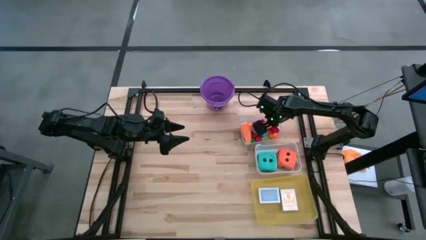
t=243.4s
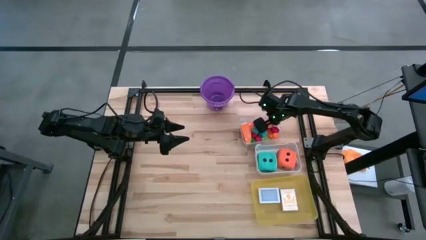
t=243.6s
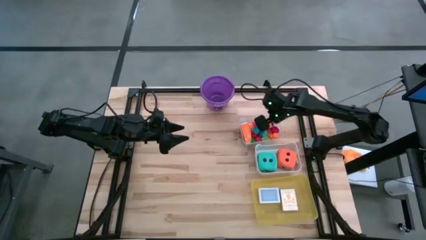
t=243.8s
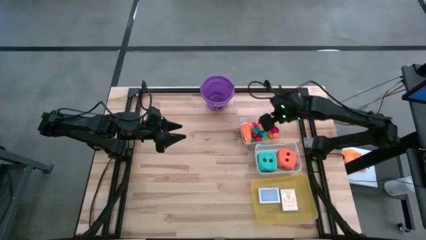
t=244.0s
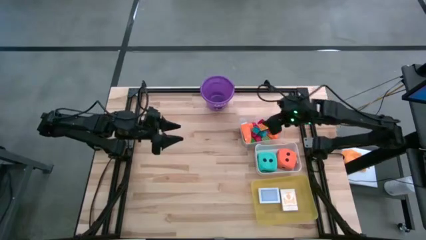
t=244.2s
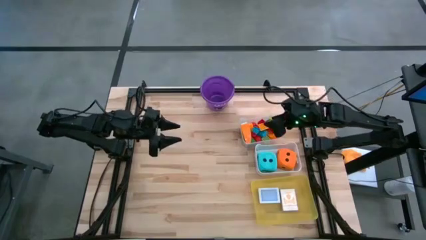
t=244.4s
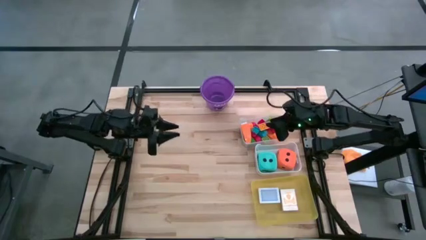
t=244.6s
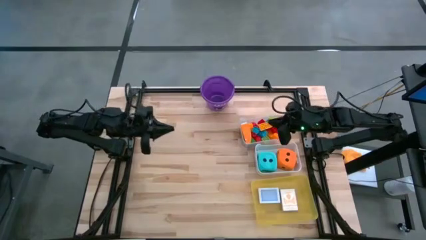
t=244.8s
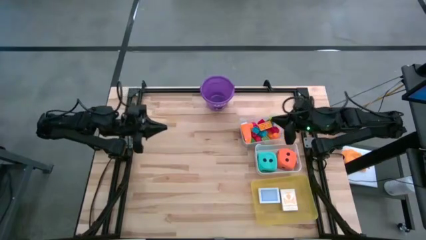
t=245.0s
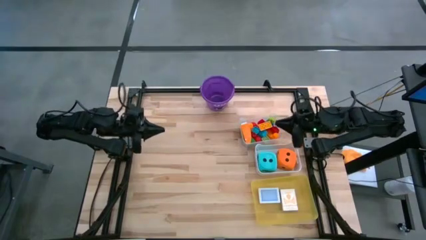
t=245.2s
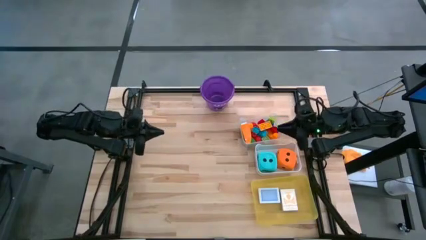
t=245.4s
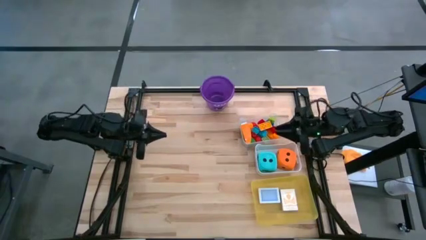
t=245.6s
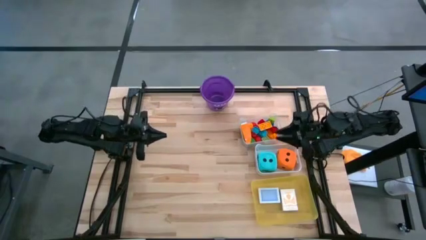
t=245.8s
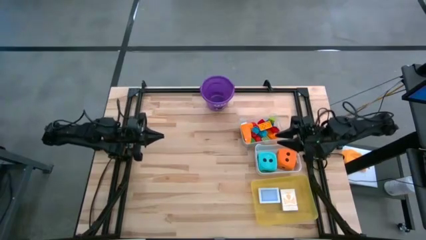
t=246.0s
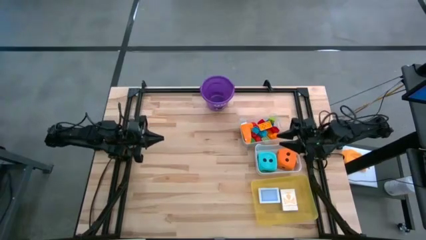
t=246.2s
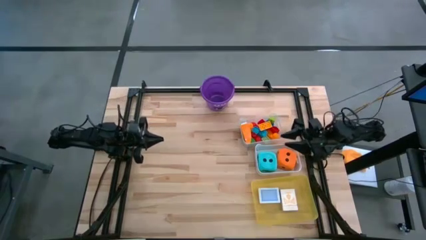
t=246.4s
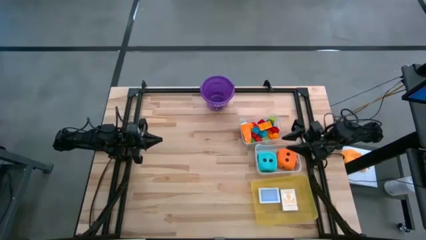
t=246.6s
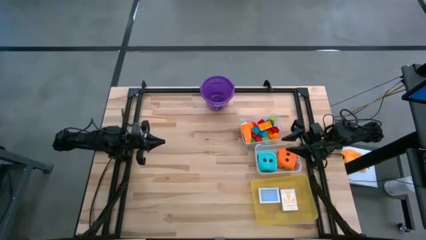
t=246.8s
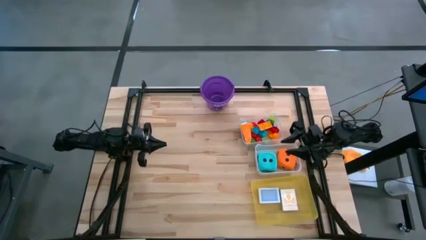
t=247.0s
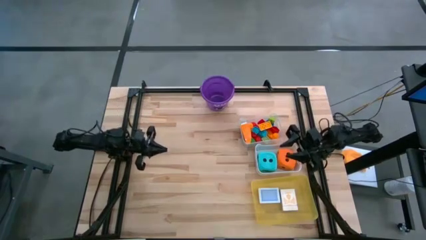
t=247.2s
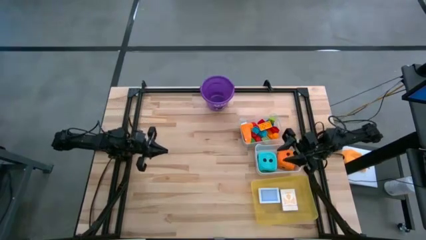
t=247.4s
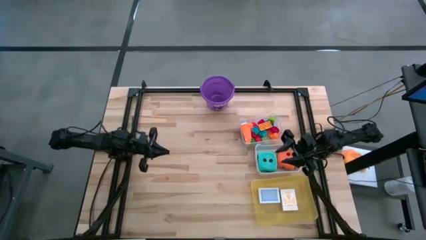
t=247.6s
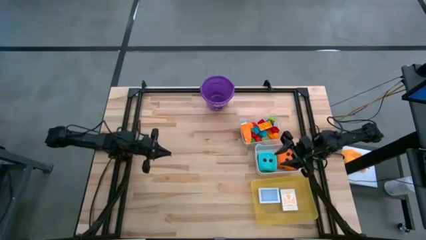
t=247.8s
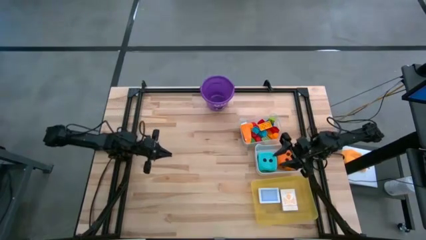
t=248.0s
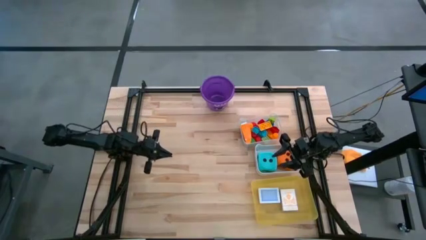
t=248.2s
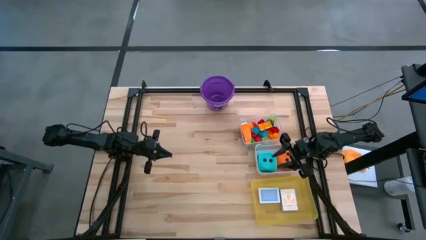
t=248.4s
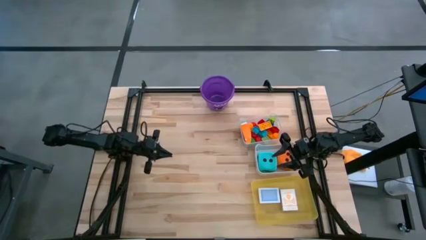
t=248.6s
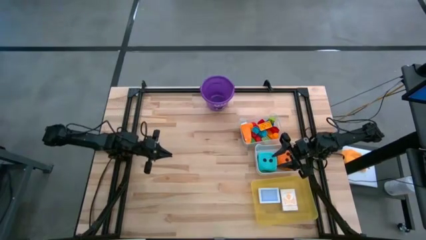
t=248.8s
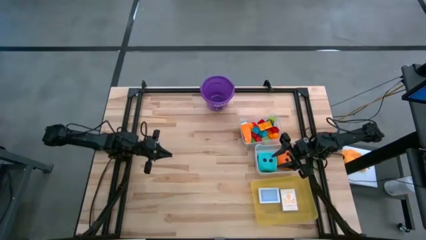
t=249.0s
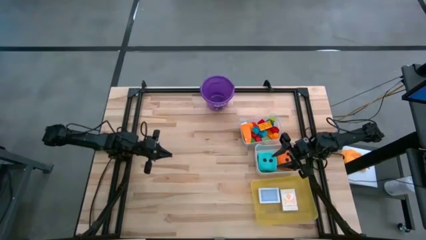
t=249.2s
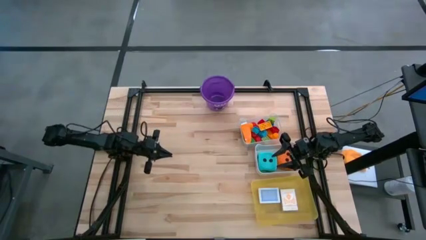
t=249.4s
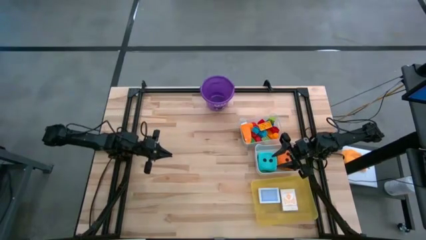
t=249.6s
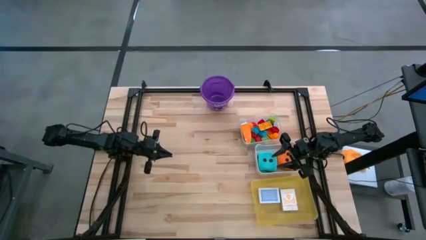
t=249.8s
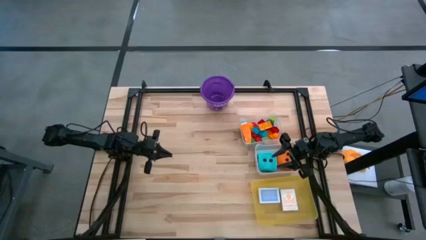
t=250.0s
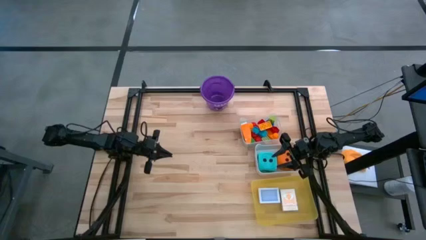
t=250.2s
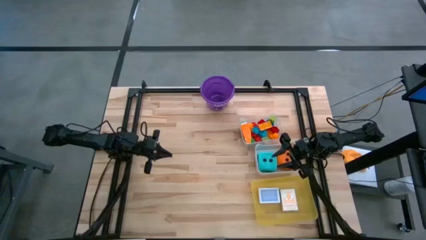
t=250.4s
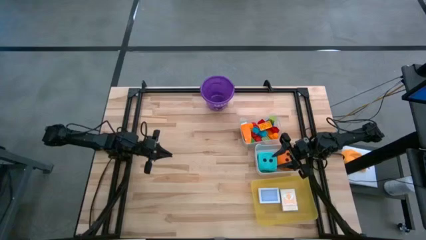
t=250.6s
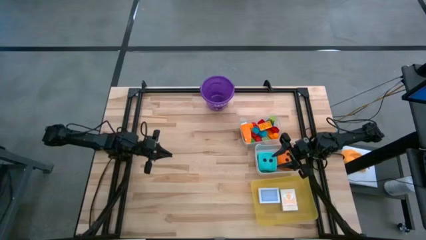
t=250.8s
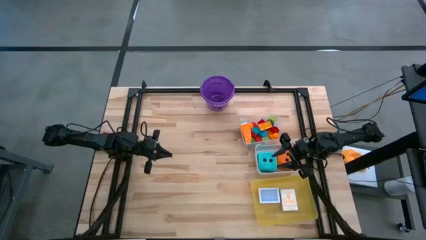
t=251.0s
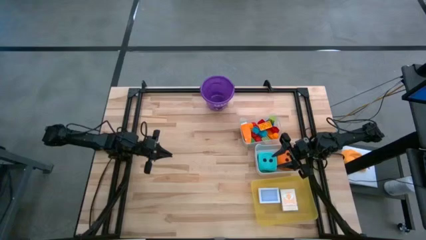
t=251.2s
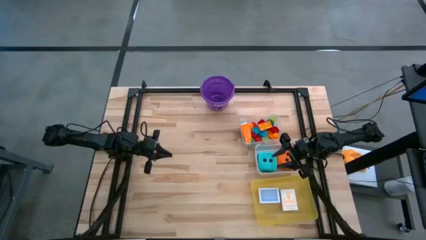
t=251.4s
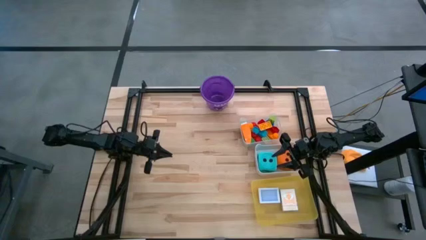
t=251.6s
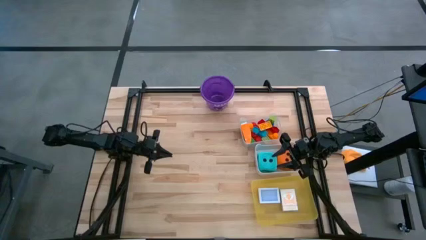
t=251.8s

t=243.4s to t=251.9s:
Task: Pick & Place Toys
Return to Home Position

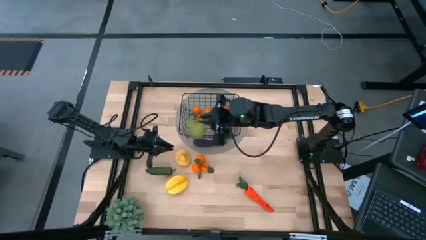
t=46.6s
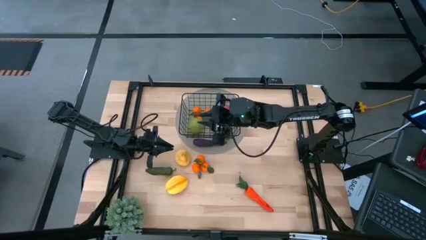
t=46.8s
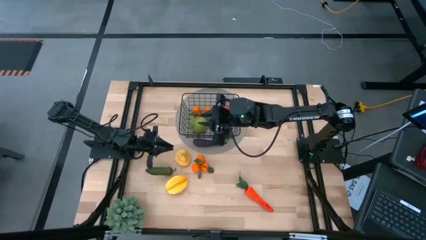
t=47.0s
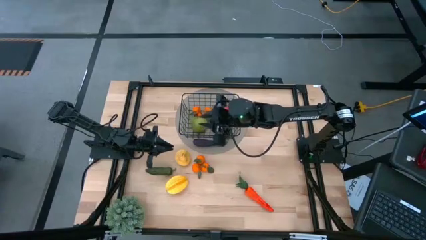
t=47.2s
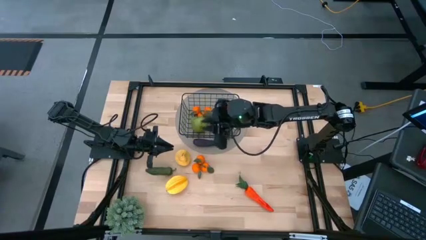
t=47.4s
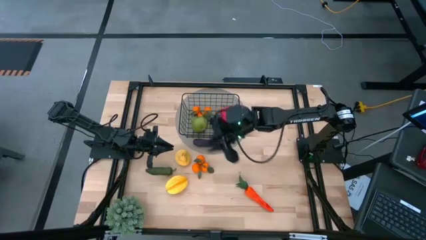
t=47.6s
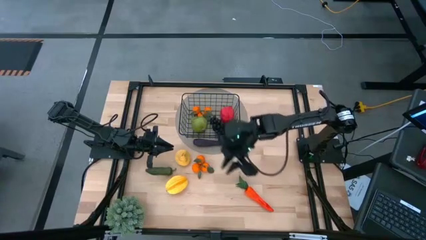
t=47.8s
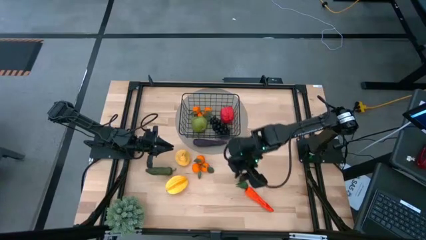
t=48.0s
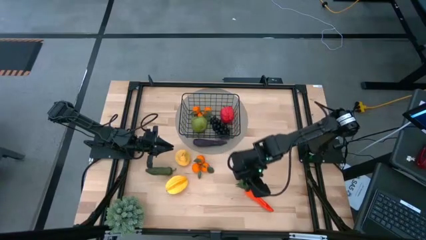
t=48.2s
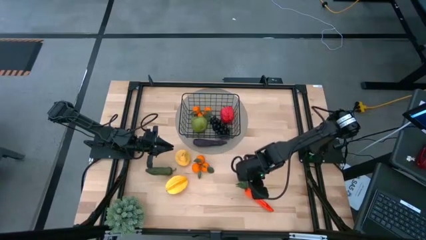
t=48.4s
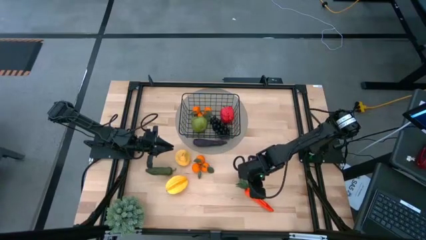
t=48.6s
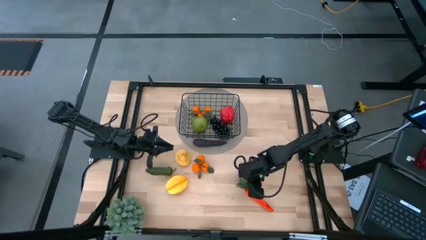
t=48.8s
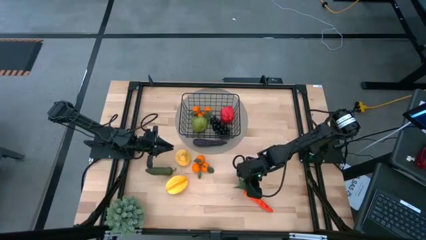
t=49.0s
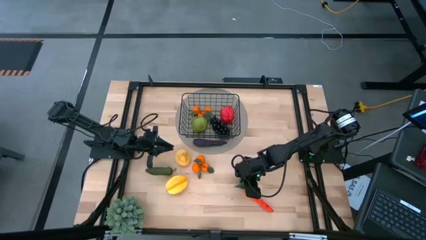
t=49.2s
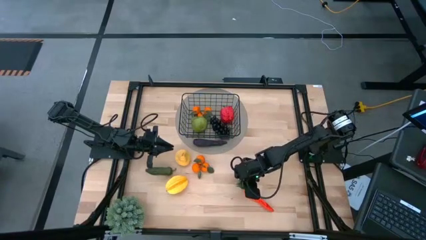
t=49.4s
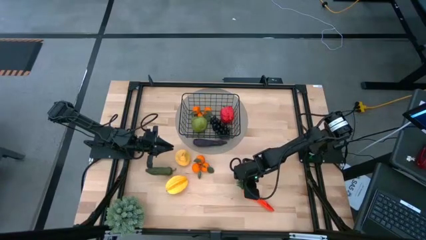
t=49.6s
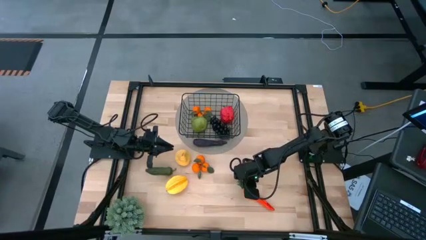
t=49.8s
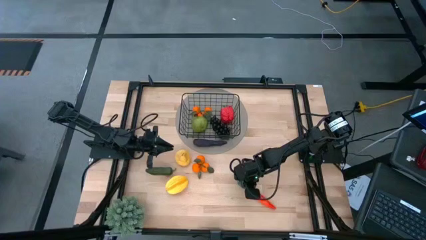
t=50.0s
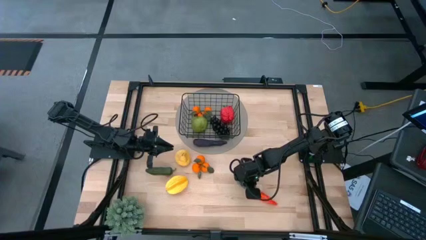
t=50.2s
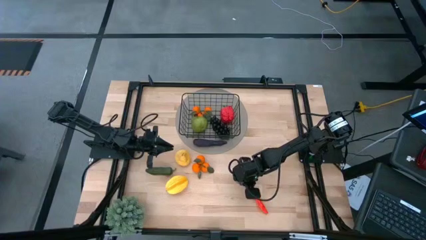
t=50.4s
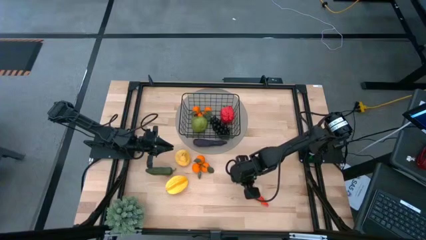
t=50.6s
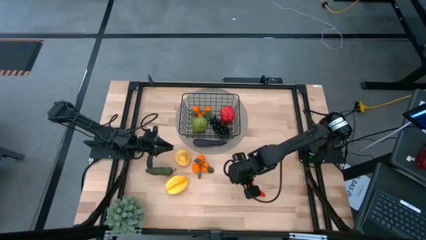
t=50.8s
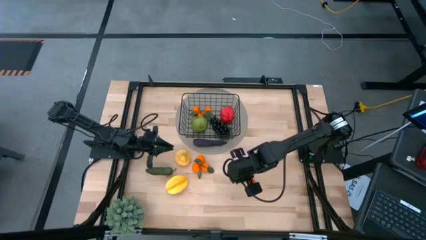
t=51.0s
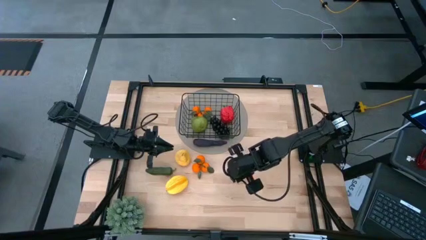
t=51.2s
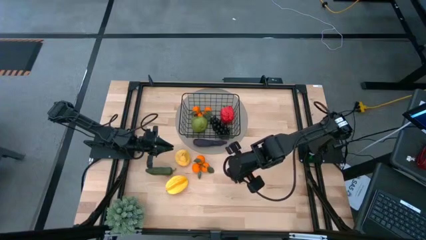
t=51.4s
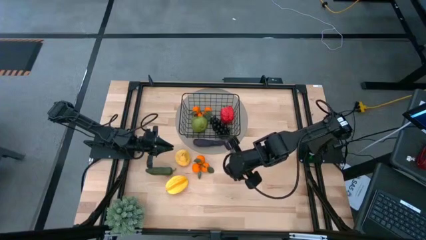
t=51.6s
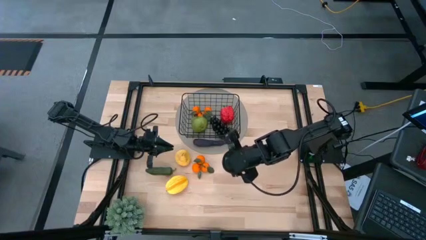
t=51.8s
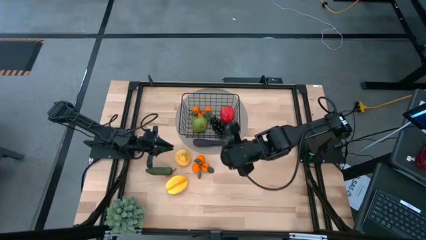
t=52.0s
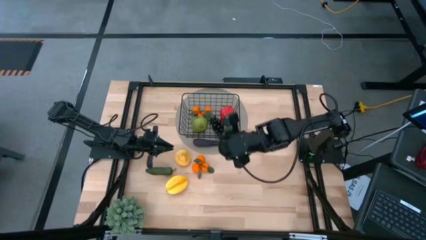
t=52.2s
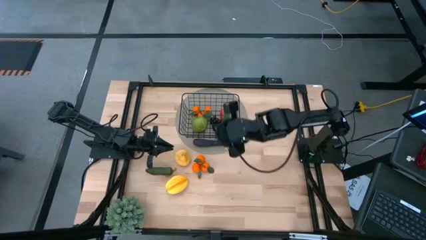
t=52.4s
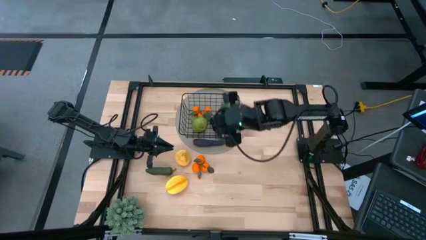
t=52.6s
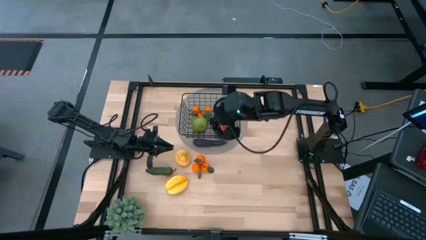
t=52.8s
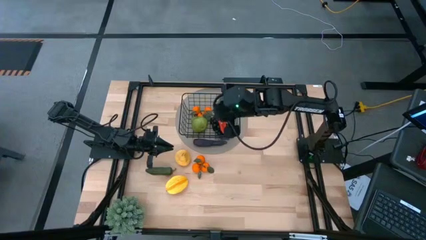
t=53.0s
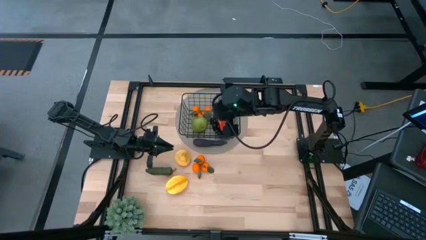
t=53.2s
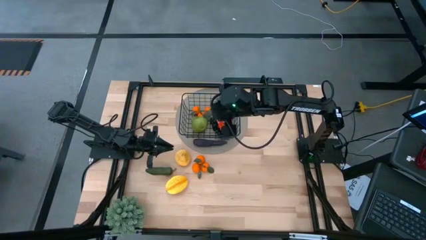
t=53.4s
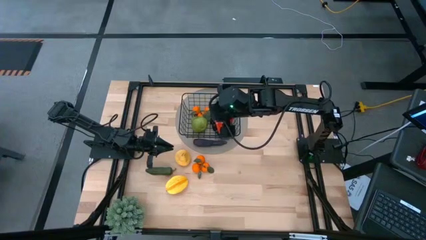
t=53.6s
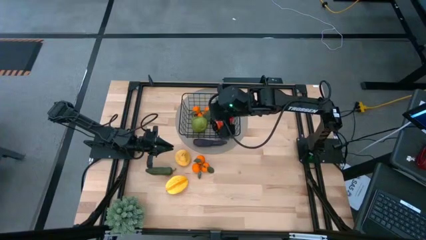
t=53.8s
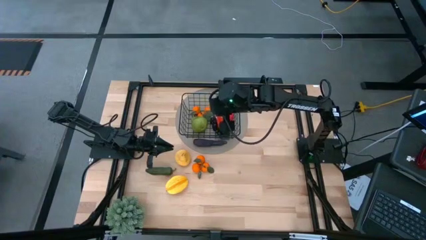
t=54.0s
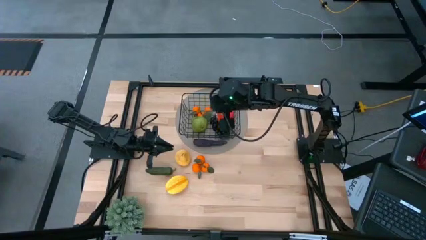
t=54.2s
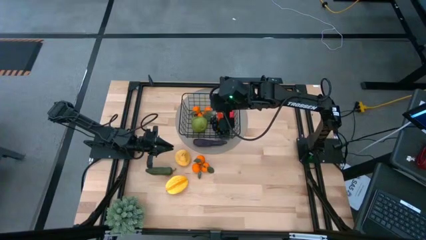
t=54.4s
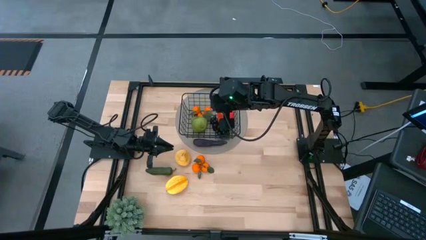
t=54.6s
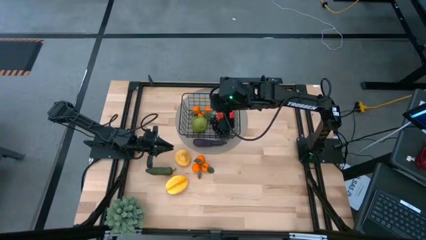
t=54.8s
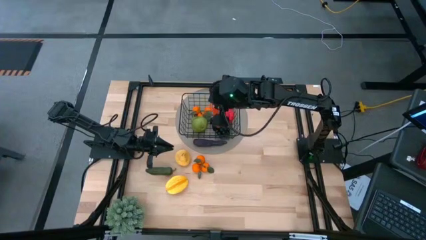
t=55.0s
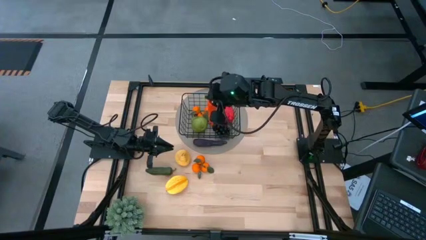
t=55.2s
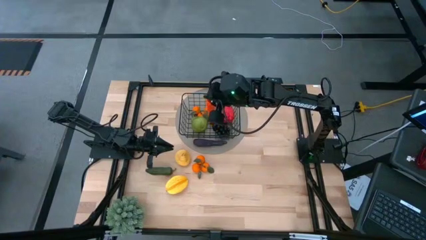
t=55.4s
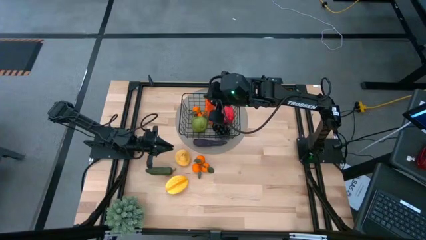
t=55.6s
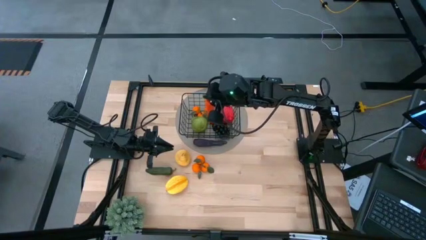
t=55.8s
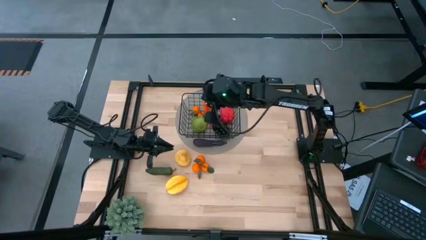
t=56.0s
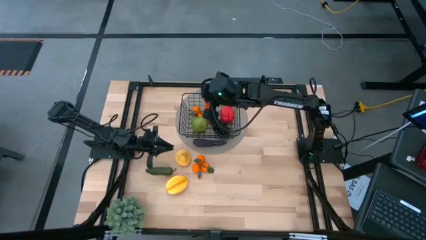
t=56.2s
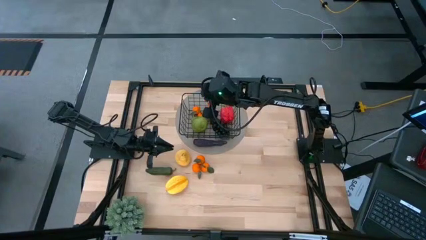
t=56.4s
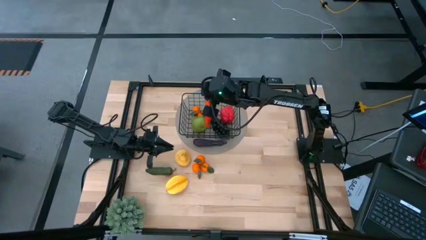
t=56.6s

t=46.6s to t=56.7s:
Task: Build produce basket
Put the carrot into the wire organizer
